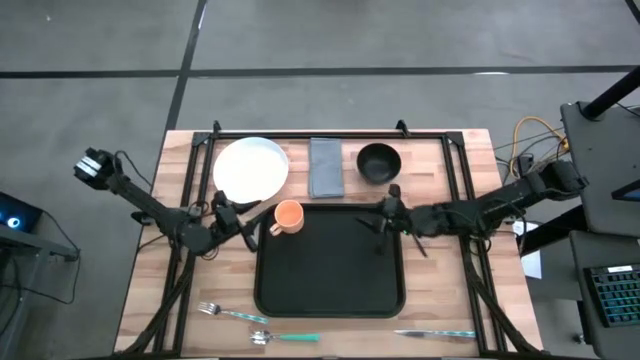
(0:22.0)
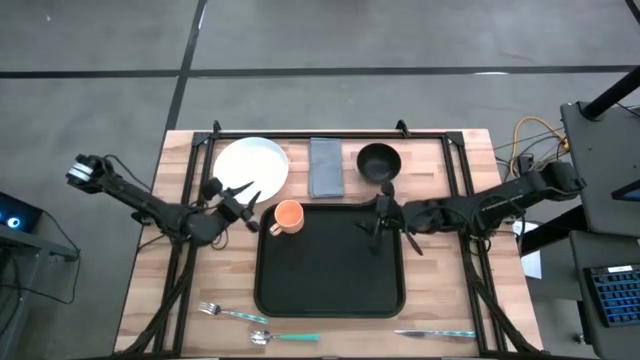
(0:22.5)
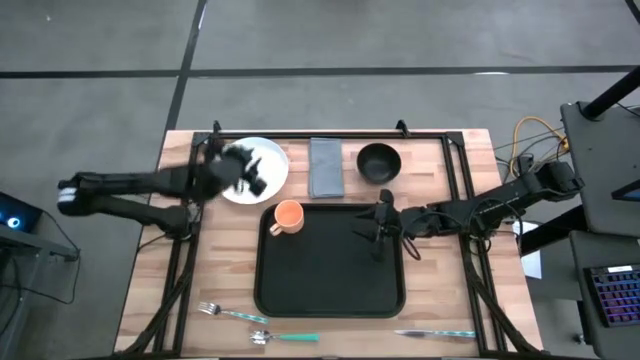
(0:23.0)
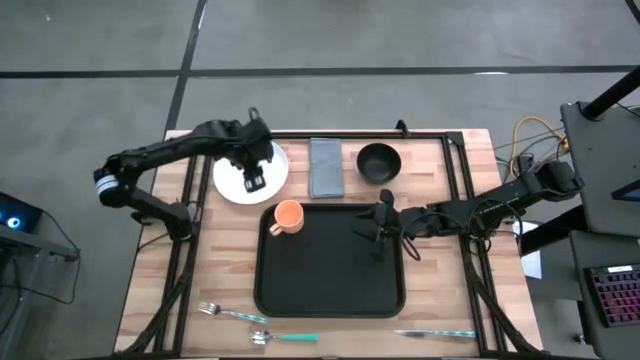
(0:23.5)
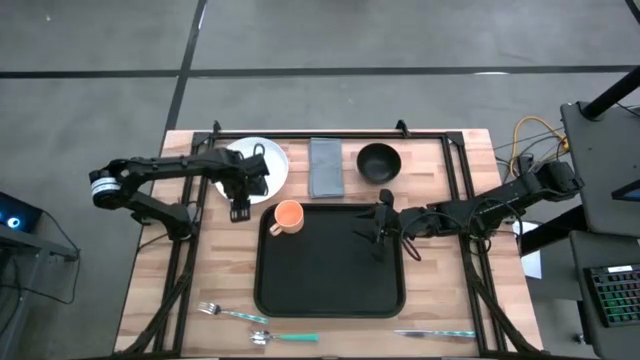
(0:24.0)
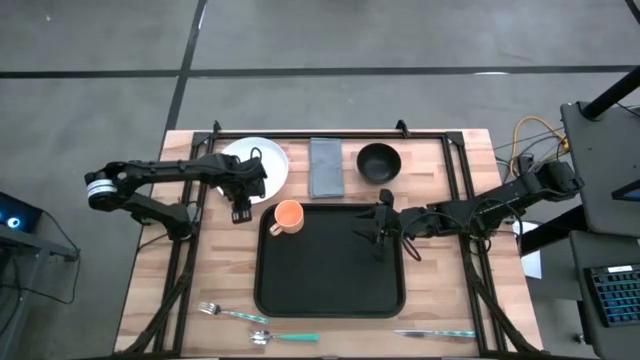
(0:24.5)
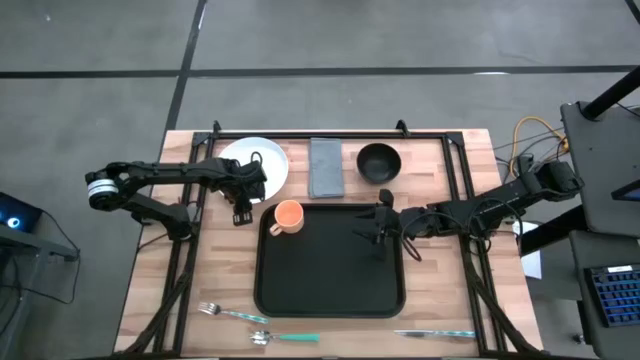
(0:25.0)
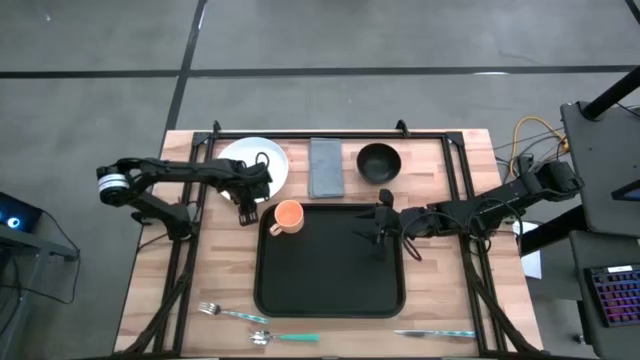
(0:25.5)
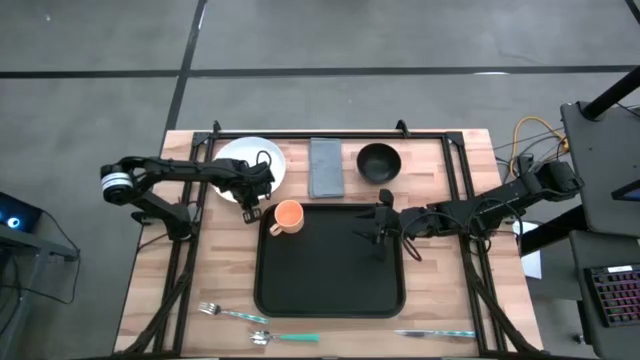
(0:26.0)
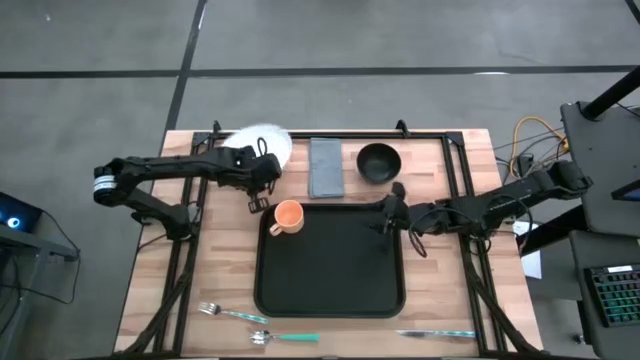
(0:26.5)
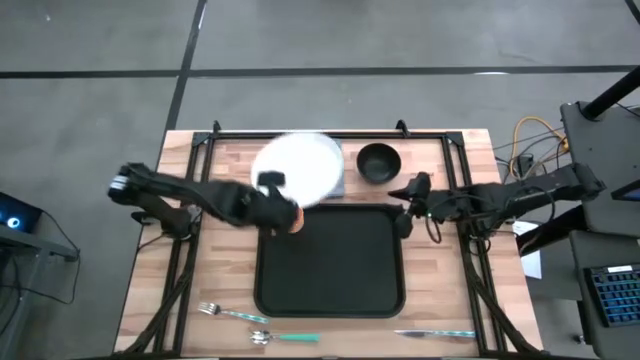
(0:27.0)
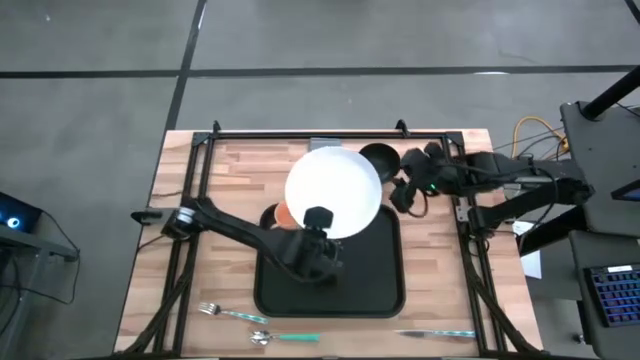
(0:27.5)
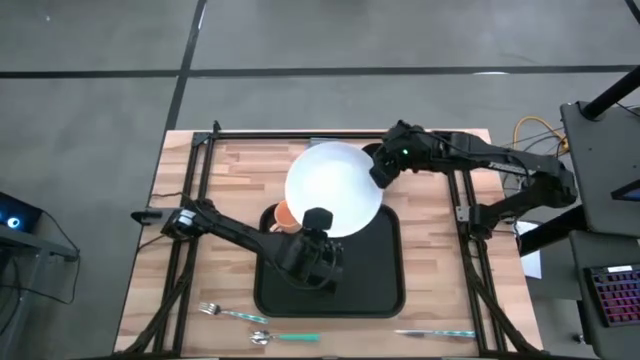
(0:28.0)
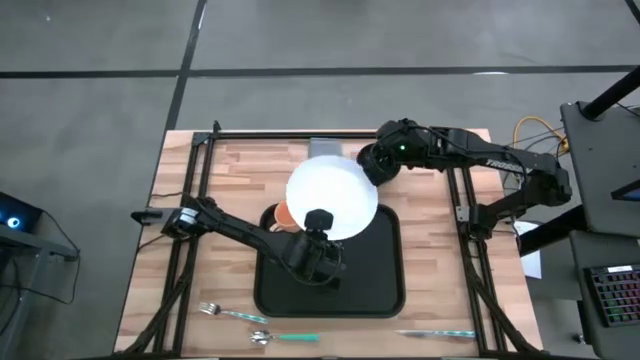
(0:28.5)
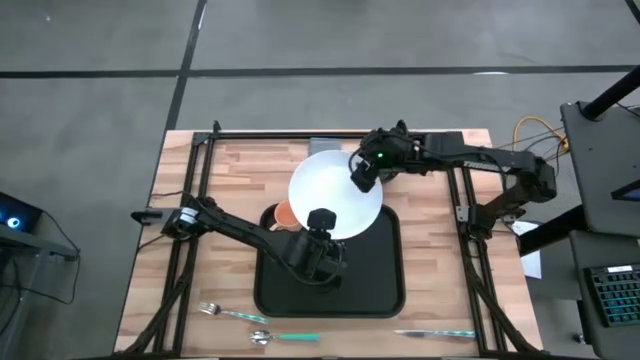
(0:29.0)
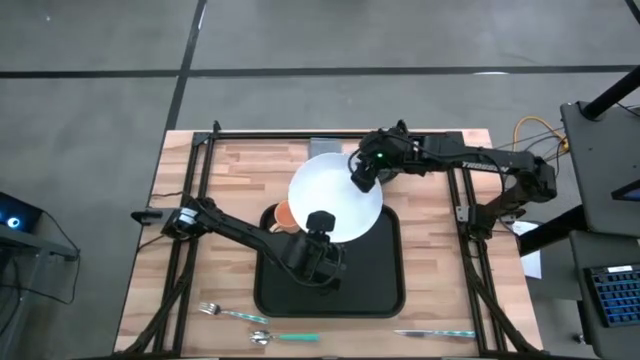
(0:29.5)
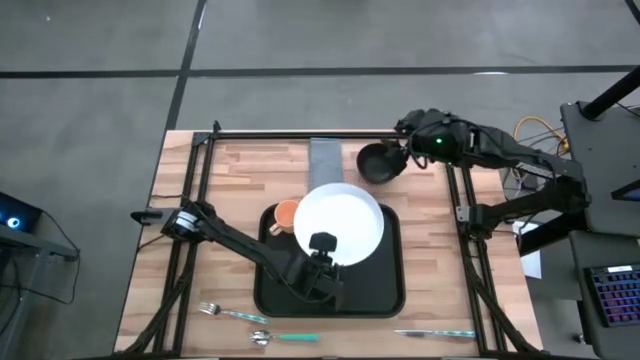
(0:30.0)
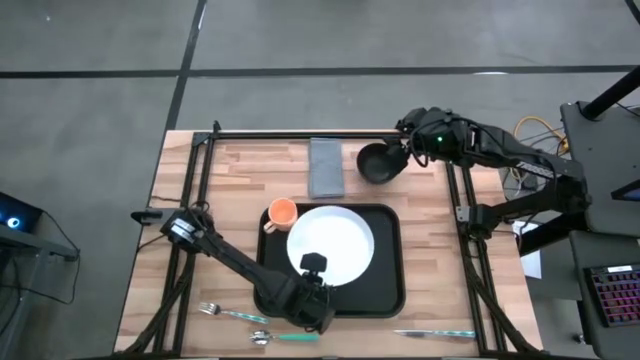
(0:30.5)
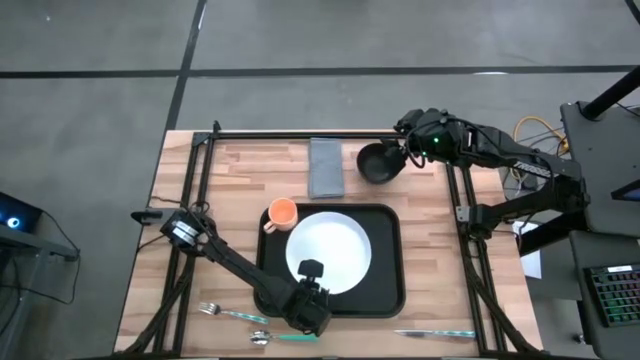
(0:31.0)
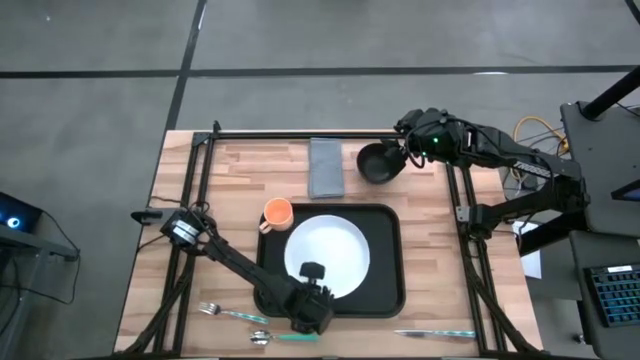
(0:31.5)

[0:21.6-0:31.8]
Task: Set up tray
Put the white plate to the bottom of the orange mug on the black serving tray

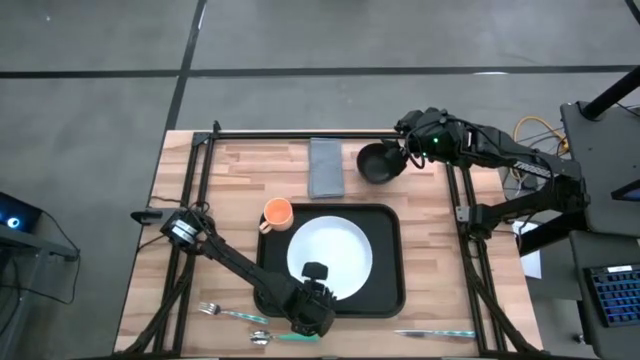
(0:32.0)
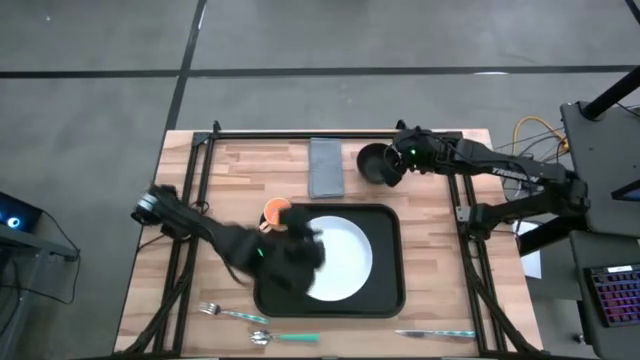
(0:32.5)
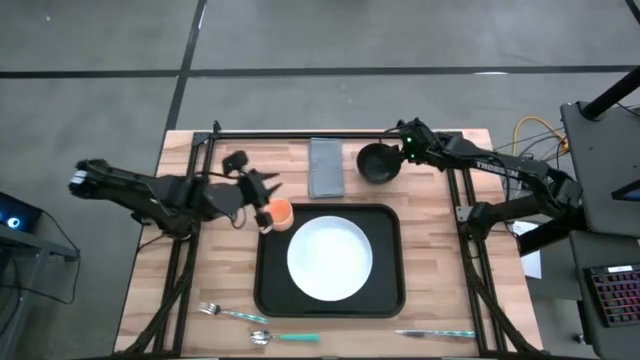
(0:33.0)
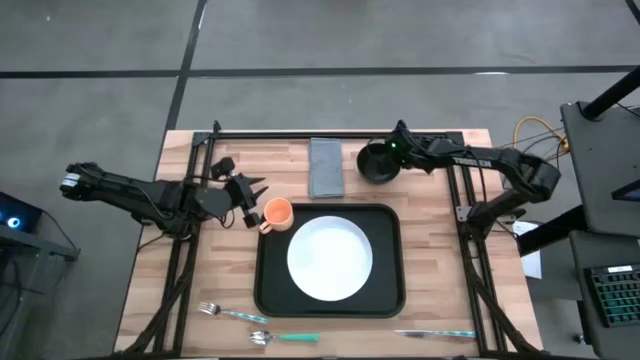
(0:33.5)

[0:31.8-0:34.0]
Put the black bowl on top of the white plate on the black serving tray

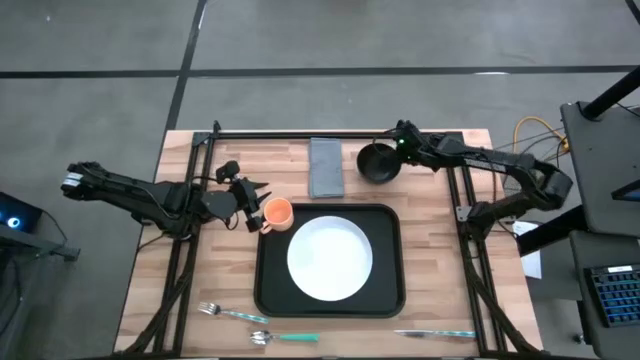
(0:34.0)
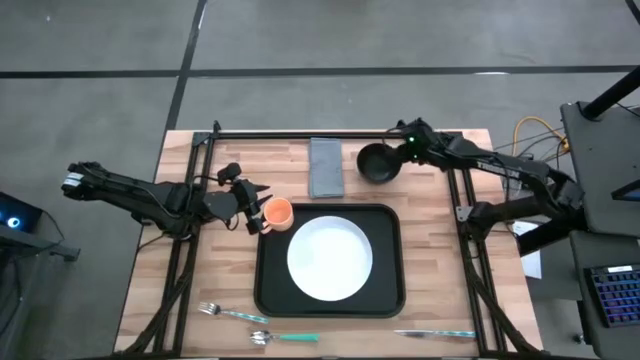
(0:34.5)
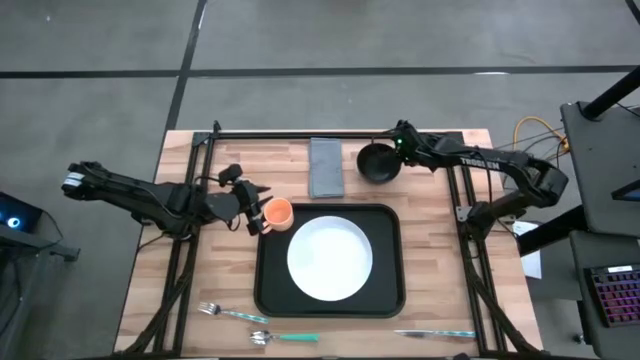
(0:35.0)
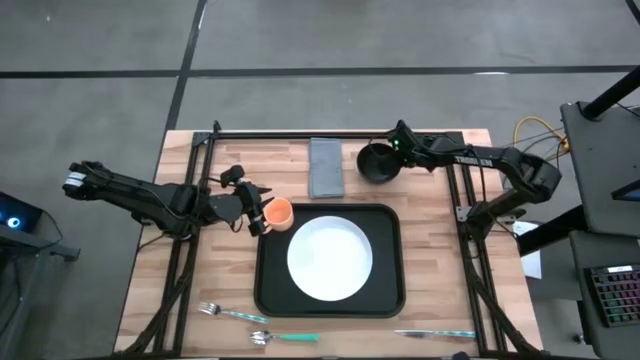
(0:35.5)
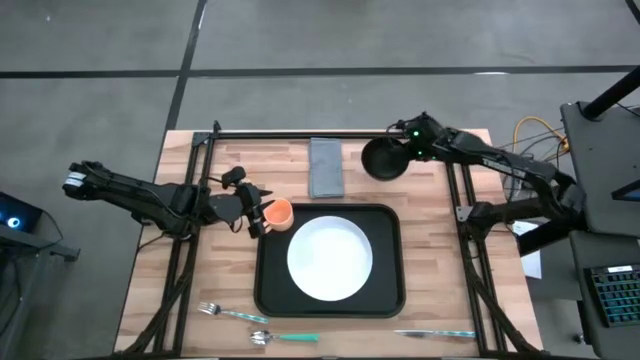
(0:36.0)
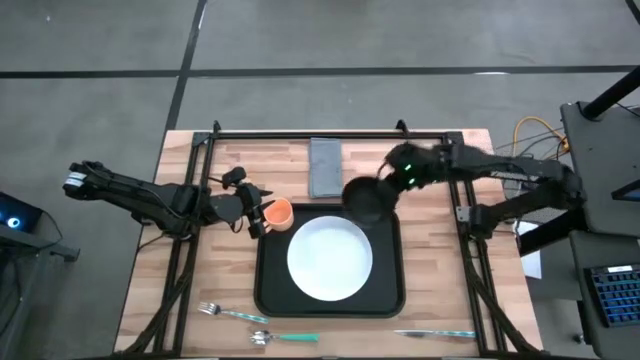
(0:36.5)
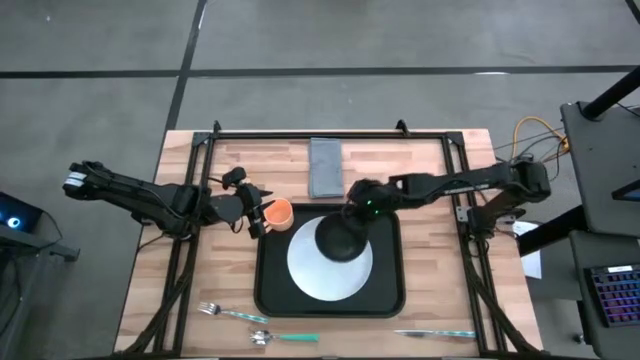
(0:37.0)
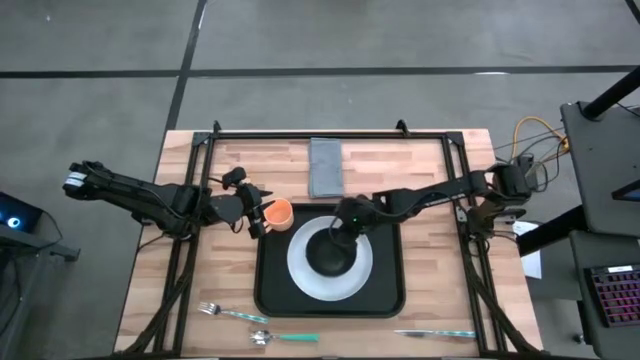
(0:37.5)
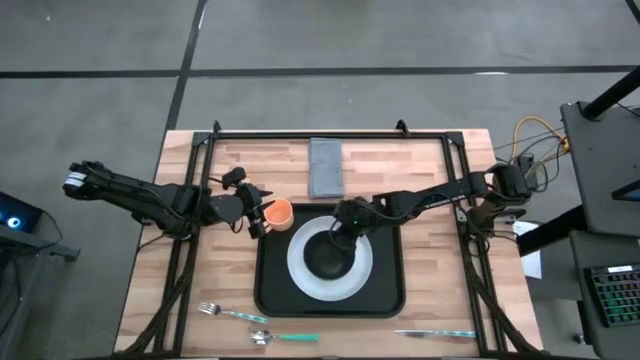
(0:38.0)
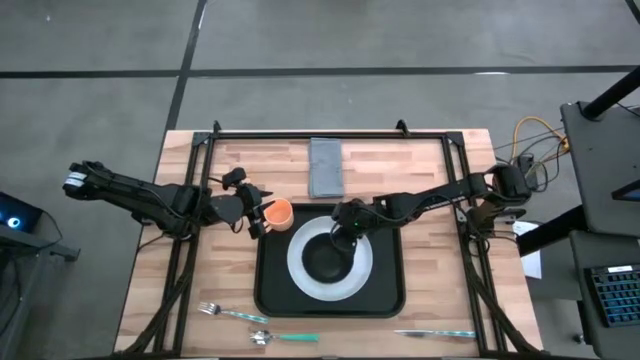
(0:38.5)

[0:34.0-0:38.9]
Put the black bowl on top of the white plate on the black serving tray

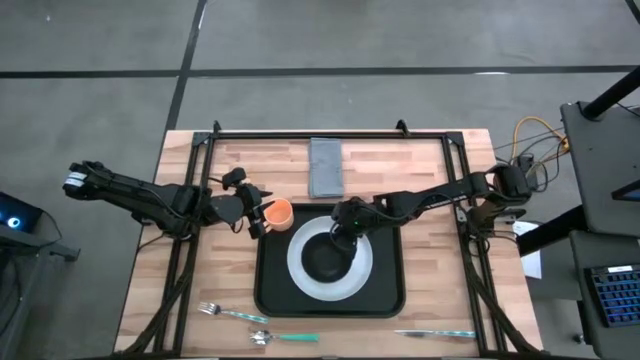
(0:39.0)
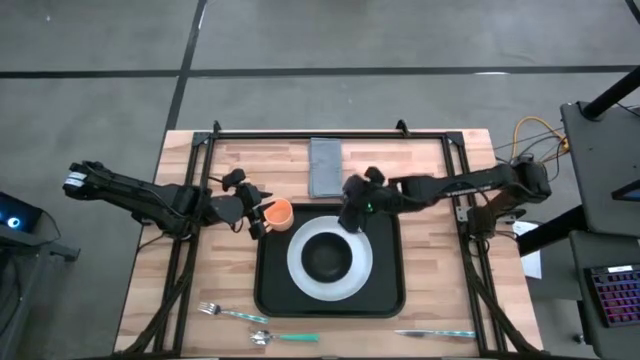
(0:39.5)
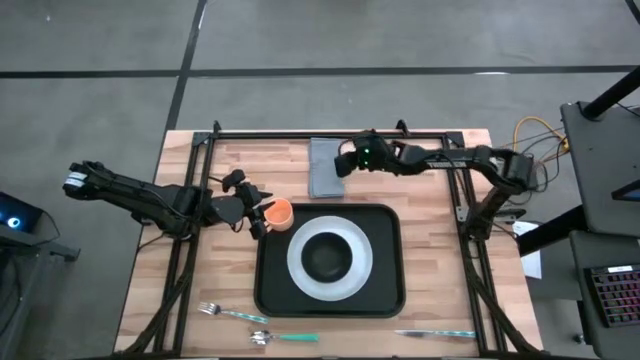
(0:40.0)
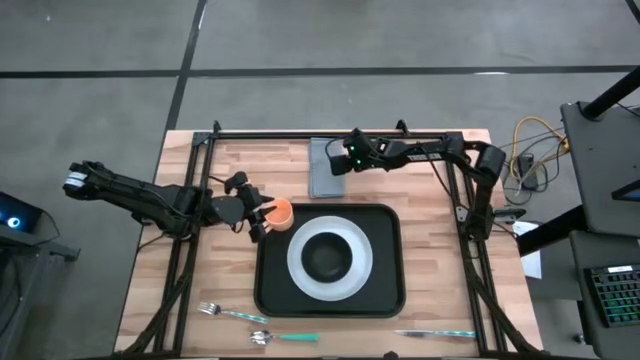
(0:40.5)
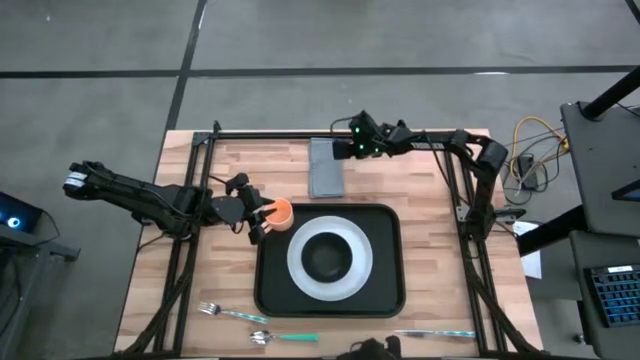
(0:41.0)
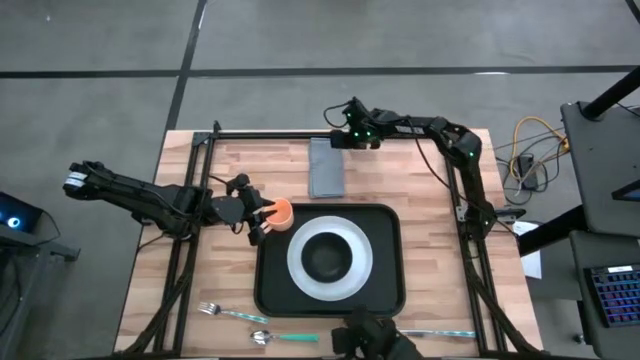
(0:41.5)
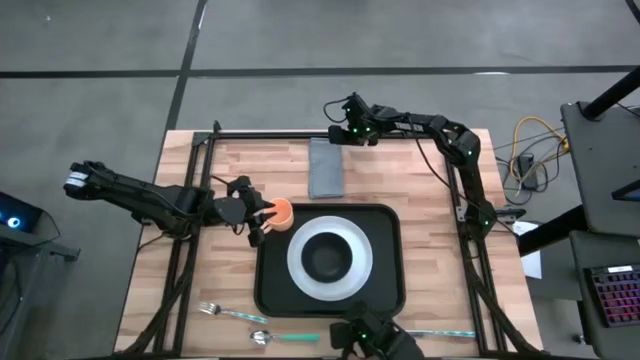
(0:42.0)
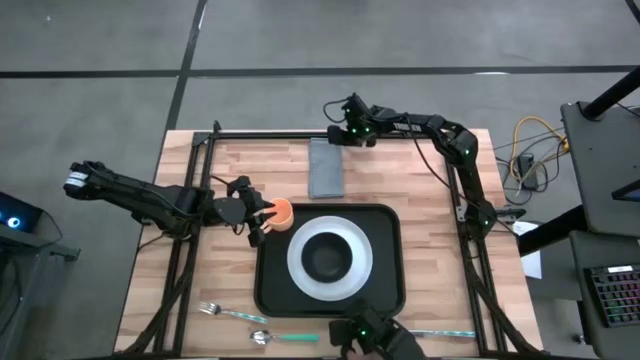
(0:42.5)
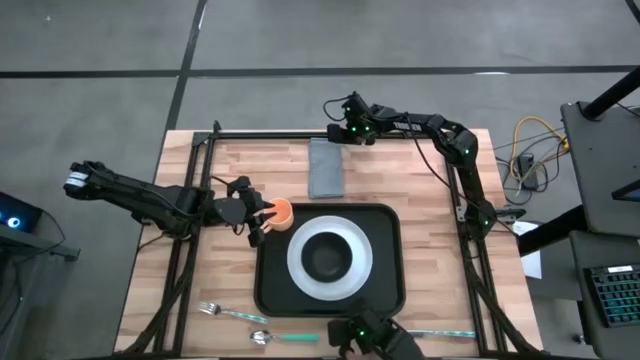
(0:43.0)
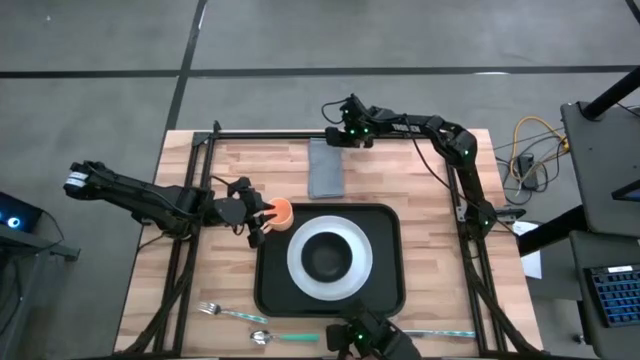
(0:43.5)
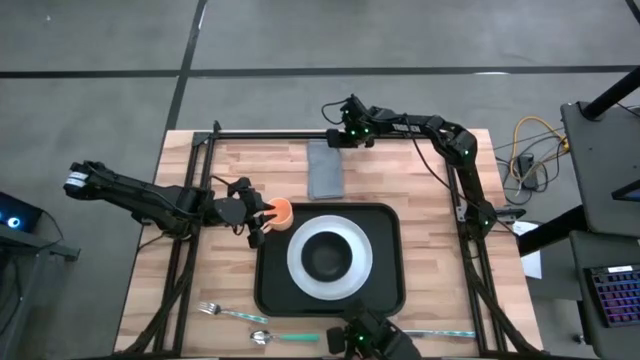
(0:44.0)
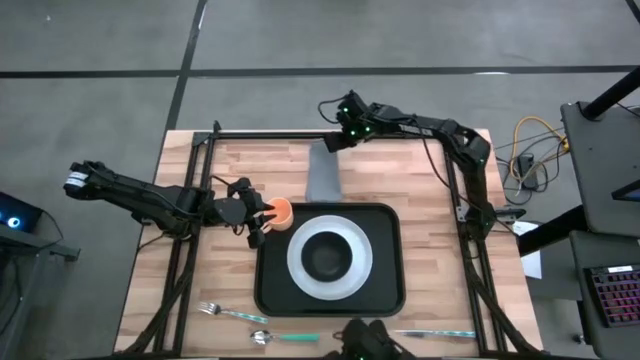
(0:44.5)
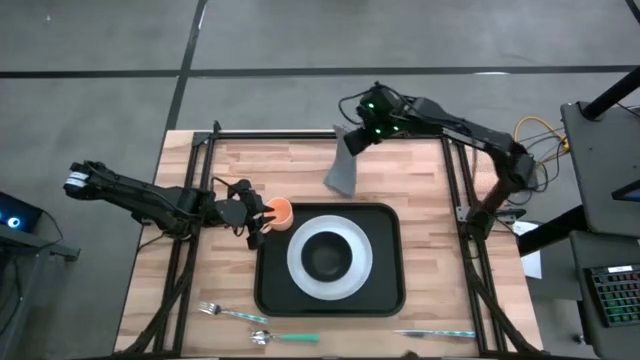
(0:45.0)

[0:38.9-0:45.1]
Put the gray table napkin to the right of the white plate on the black serving tray
